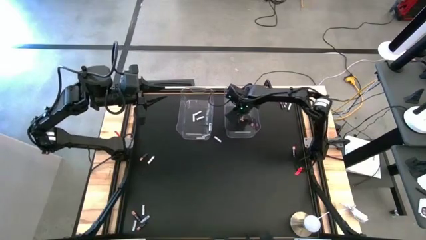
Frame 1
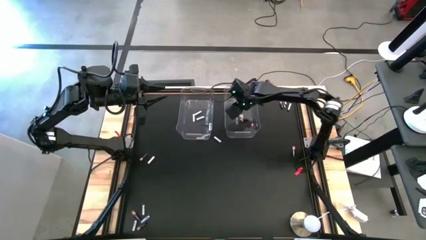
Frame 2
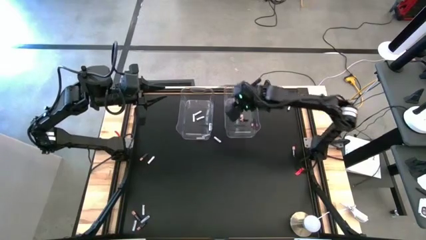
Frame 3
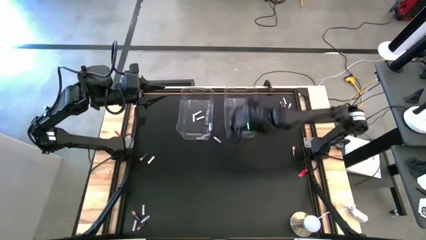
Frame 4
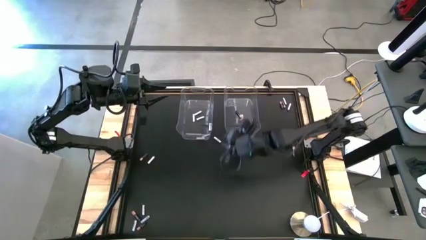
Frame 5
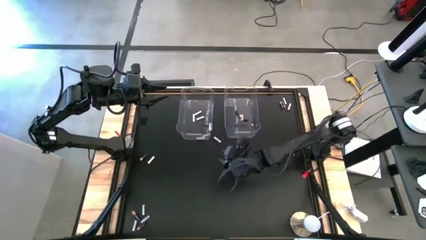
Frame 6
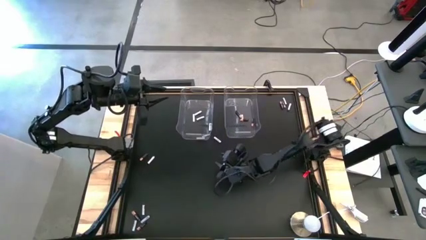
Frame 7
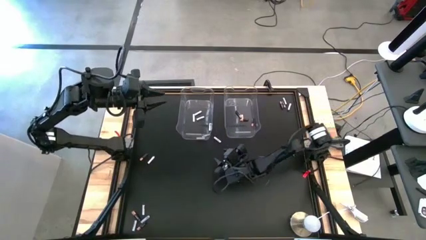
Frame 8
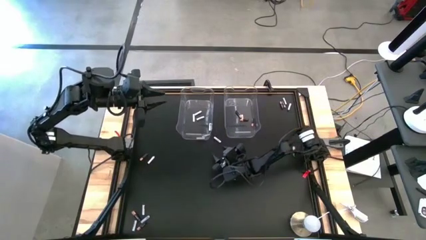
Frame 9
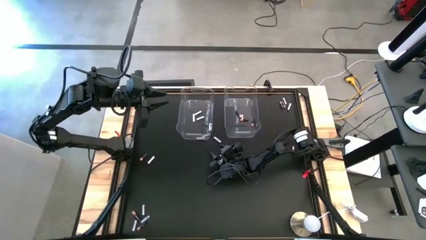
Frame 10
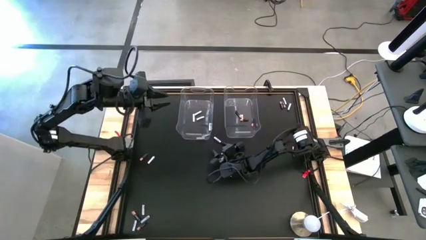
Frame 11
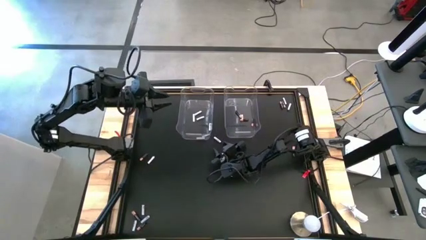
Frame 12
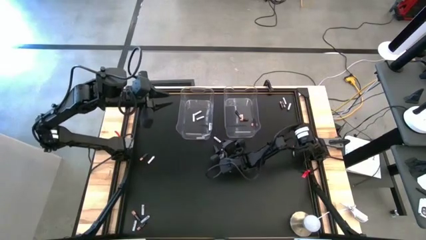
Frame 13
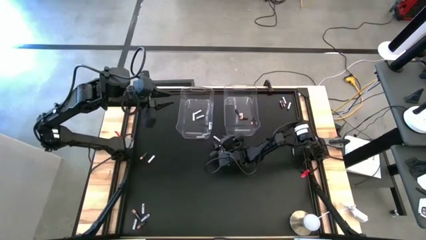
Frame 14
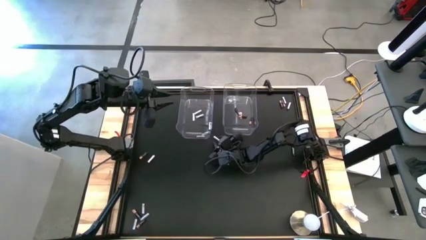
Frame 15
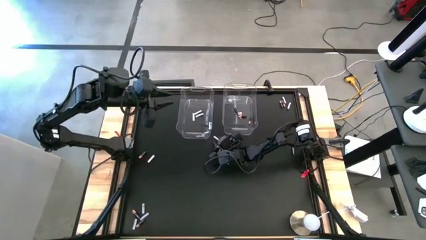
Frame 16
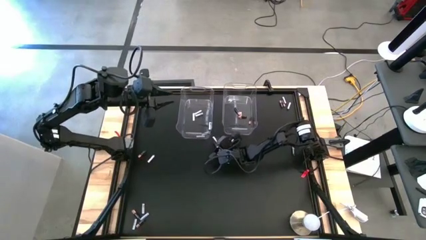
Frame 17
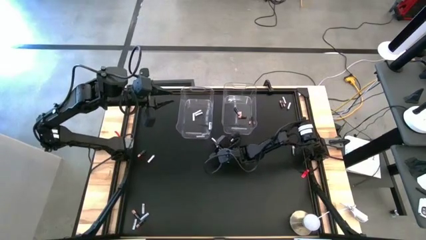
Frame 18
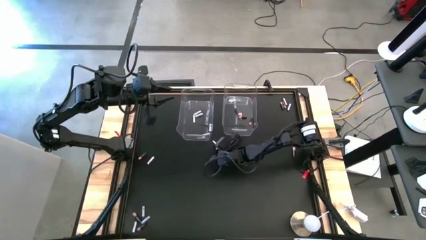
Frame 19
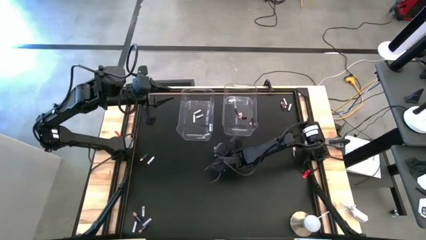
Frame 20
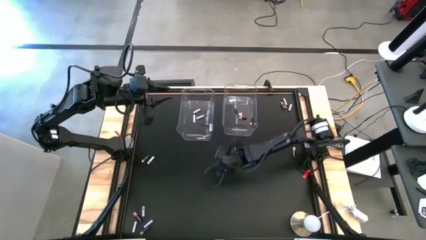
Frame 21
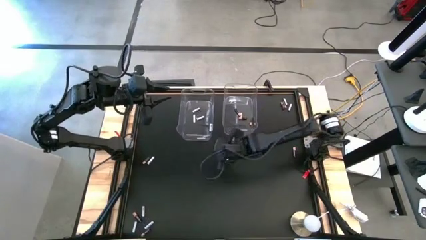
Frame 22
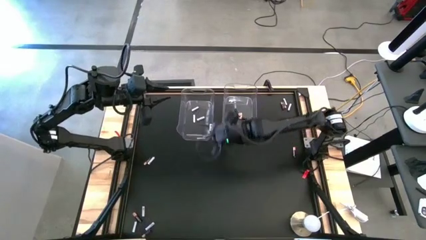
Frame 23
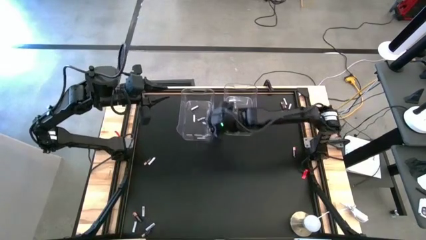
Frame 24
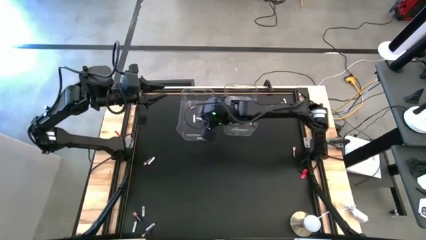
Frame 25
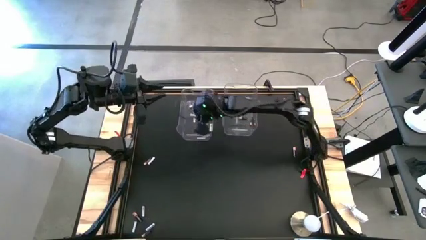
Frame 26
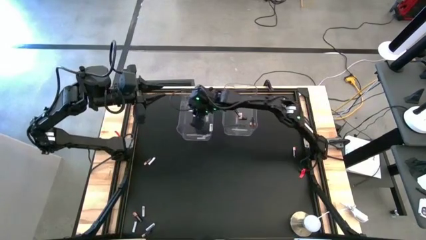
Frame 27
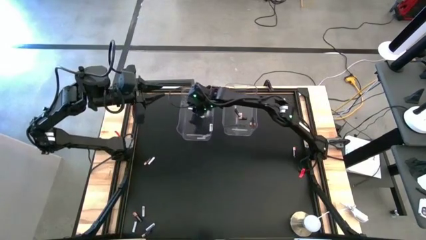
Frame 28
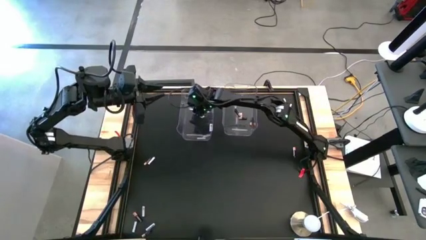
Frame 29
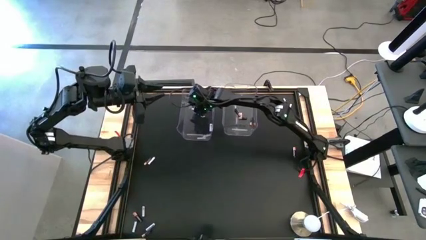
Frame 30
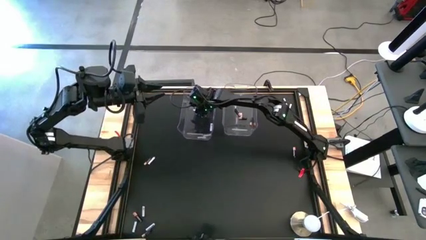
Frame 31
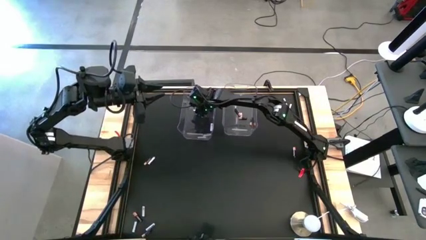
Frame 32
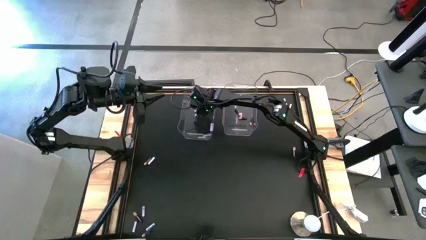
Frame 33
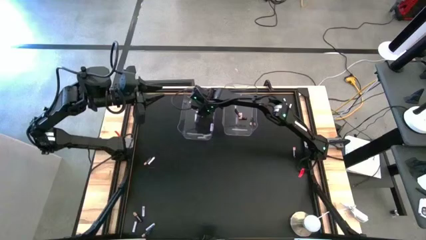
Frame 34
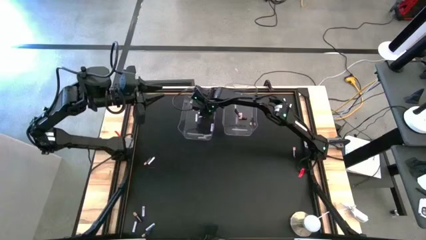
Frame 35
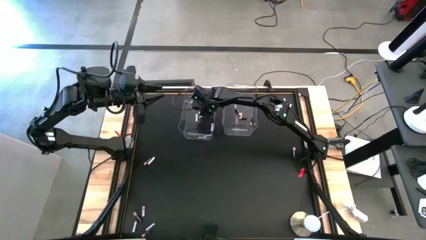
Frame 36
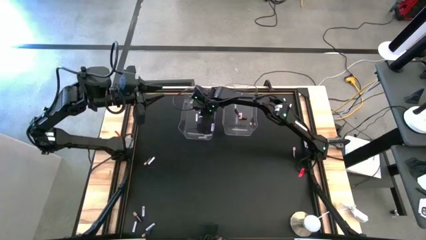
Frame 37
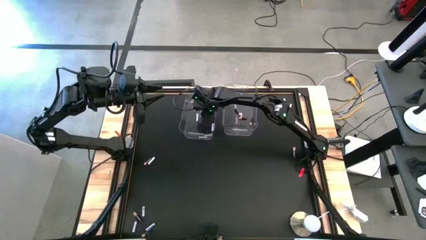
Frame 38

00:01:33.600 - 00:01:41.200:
Task: Sort batteries
Put the white battery into the left transparent bin

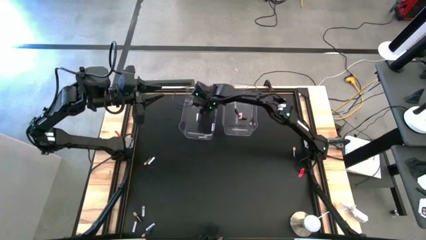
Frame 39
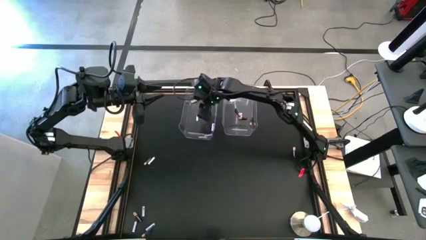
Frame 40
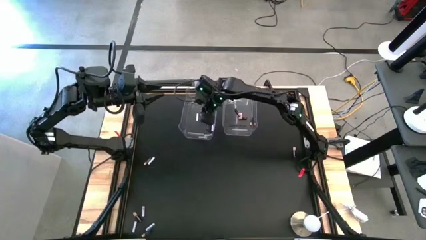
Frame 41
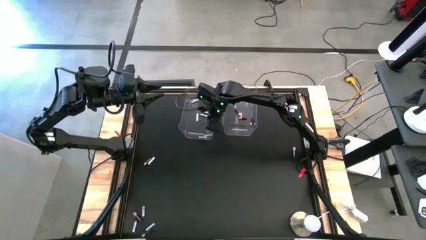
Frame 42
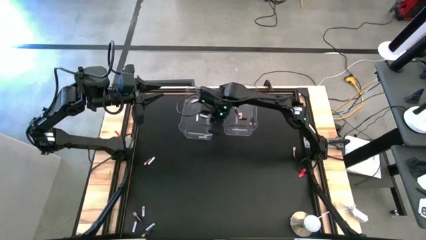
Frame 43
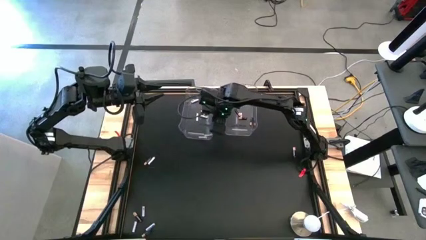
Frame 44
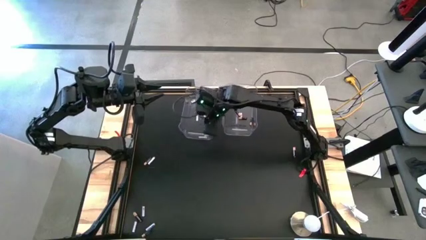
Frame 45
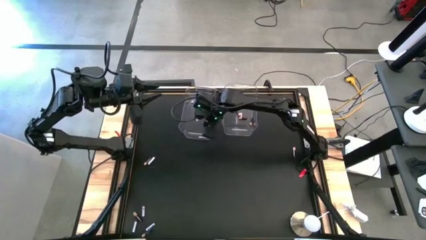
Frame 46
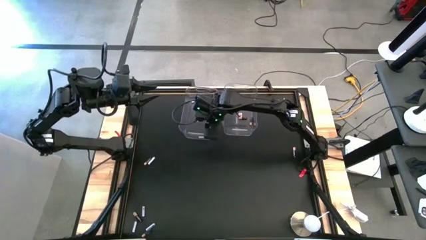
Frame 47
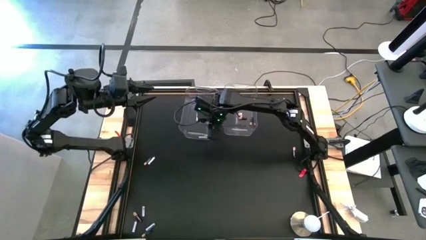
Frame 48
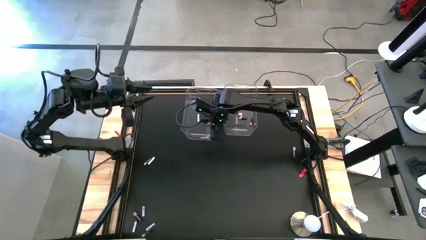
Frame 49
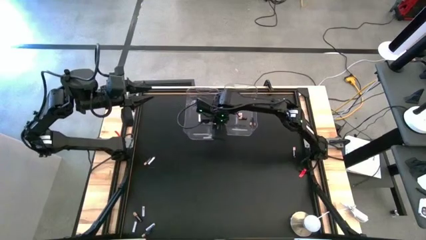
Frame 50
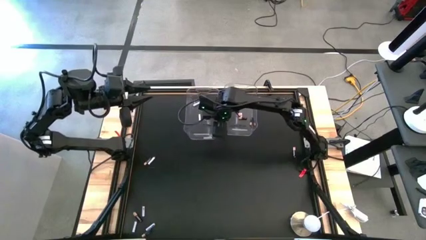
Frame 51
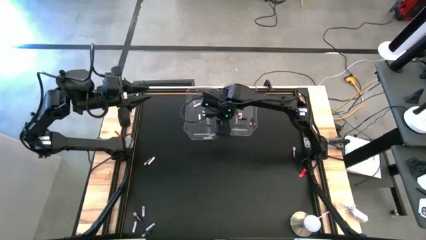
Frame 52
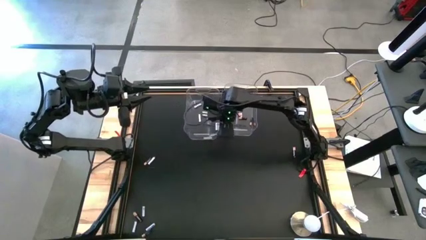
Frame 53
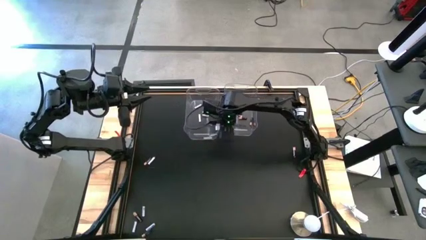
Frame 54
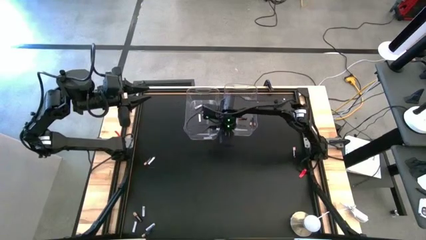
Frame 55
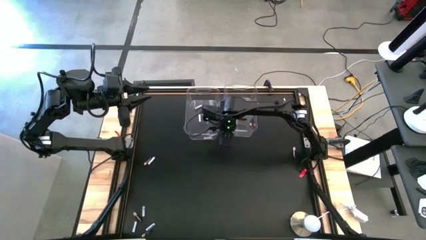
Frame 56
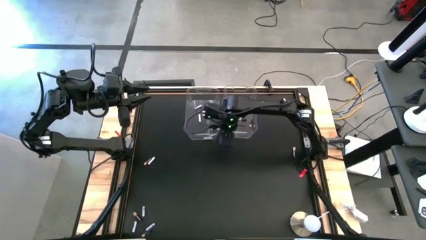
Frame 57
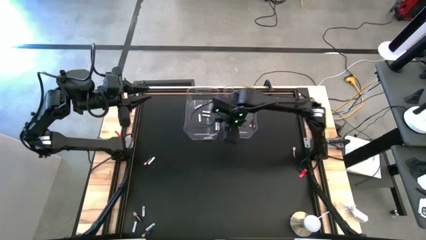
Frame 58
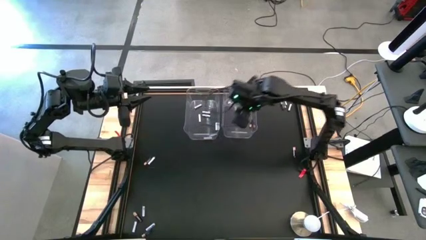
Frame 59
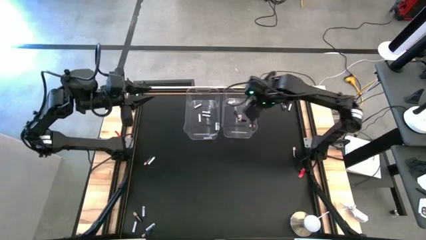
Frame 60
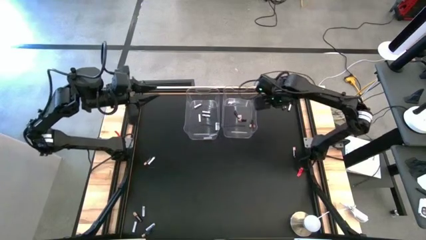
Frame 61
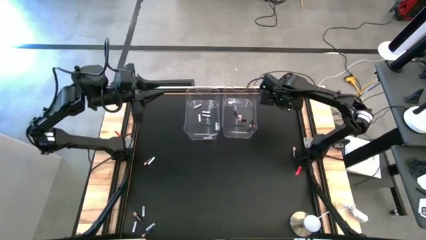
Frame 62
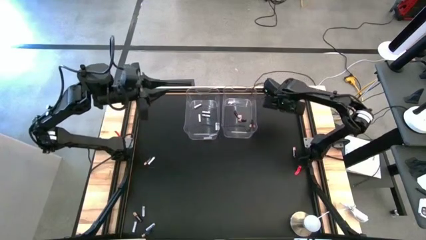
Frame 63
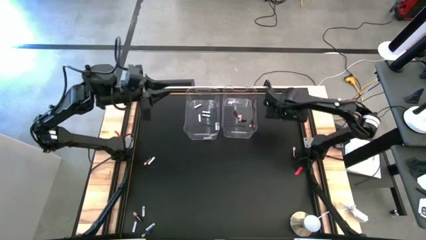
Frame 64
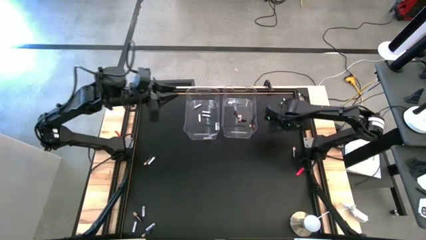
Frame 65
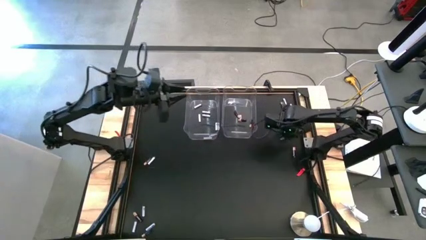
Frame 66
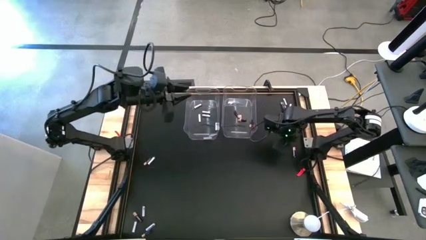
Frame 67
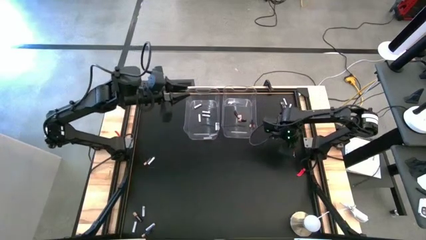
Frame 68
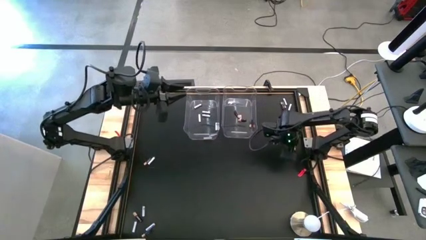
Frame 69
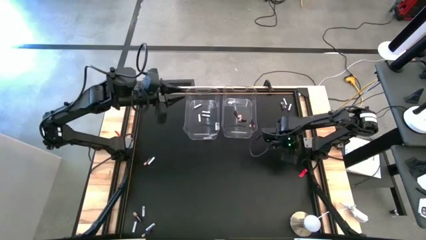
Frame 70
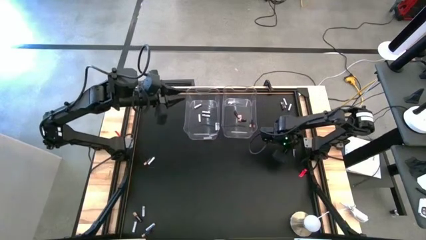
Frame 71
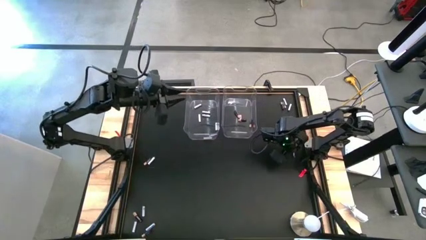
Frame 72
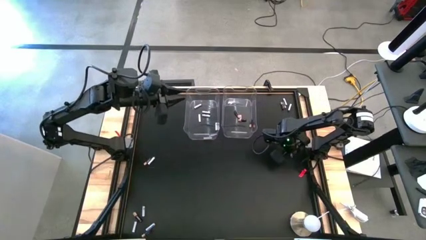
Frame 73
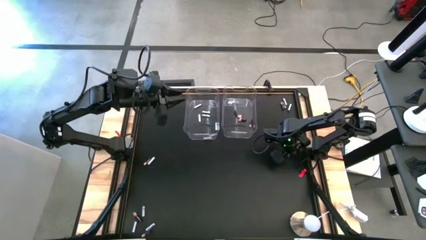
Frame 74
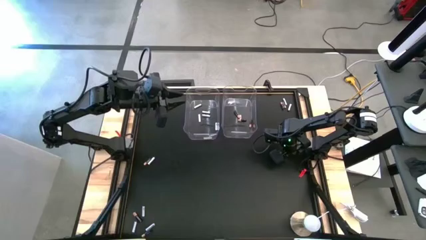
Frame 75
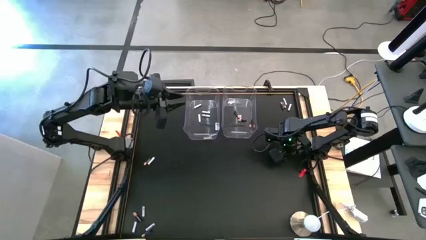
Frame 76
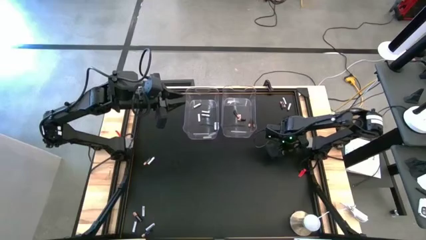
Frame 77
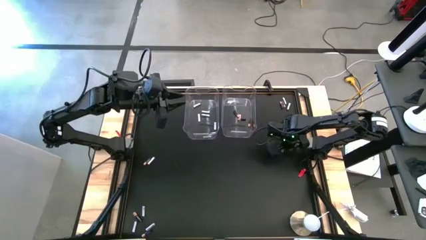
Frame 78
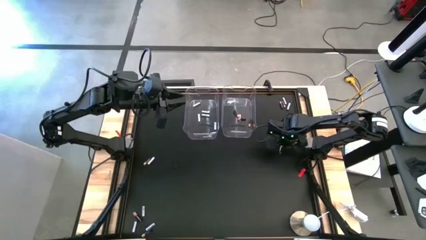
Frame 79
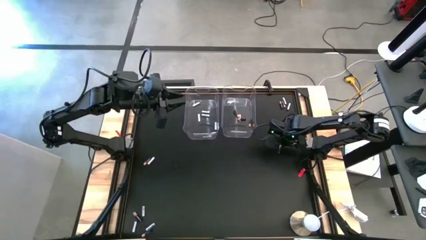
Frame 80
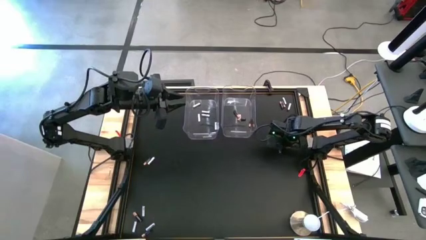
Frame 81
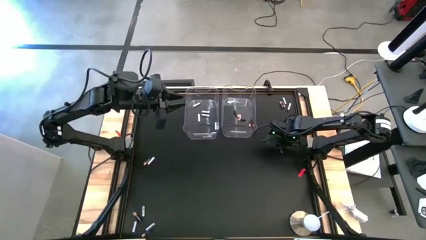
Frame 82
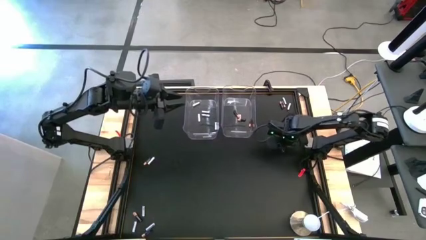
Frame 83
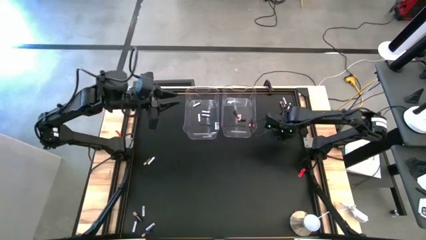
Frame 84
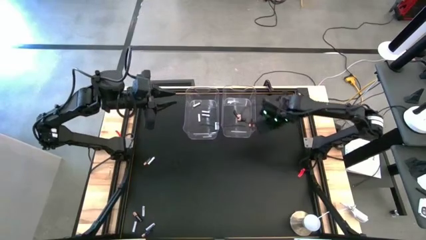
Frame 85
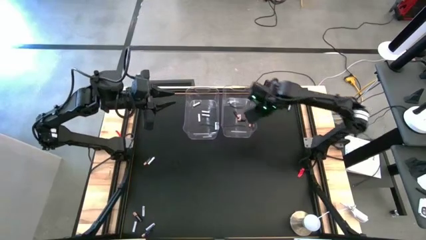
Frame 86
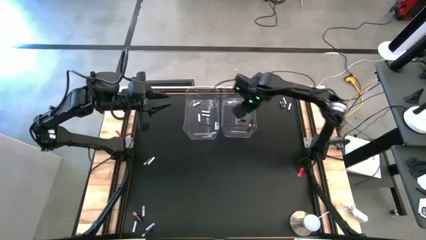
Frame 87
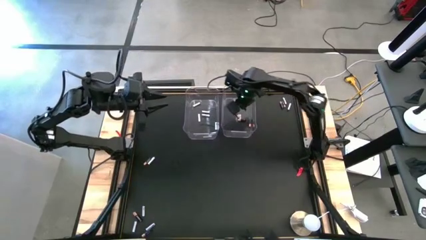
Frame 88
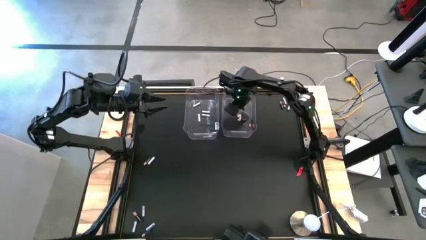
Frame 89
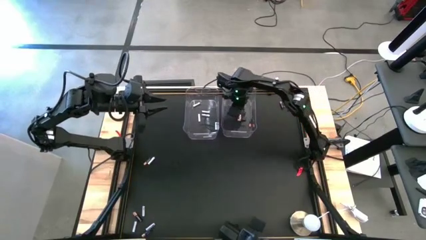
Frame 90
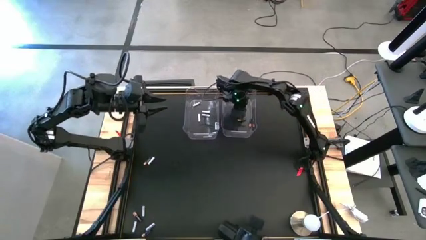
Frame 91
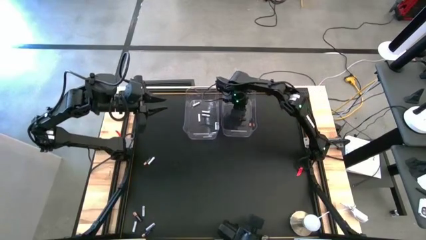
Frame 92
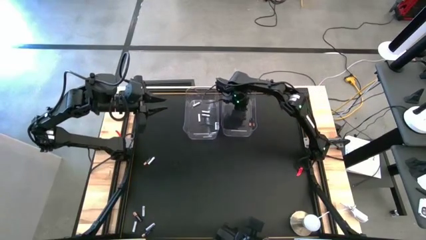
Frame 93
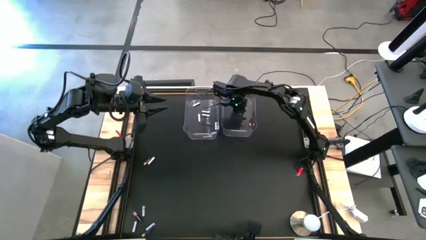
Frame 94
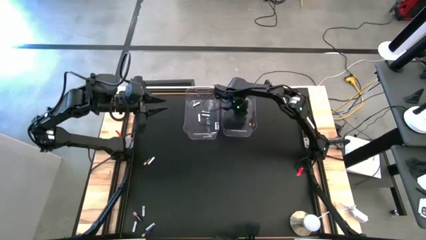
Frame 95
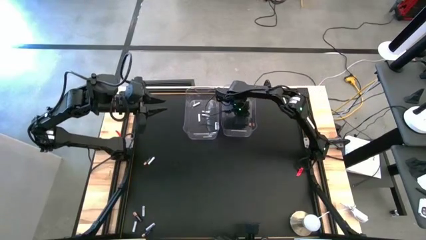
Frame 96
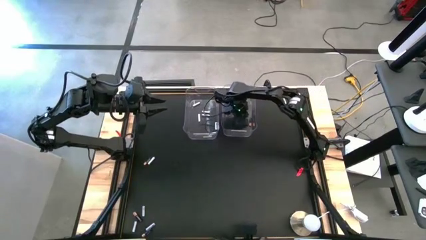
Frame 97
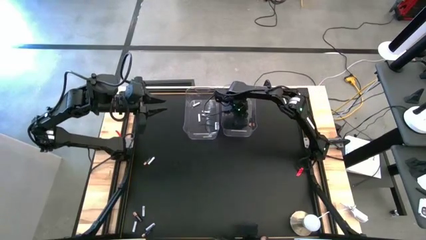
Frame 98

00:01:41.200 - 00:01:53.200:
Put the black battery into the right transparent bin
